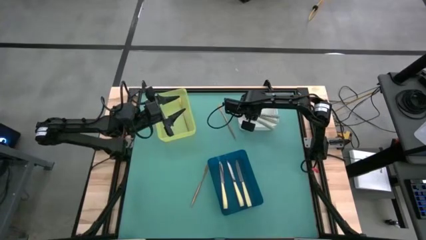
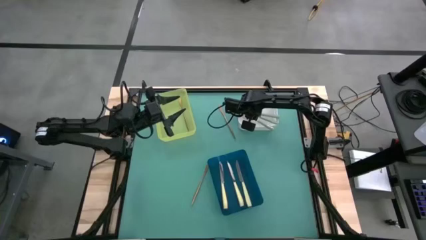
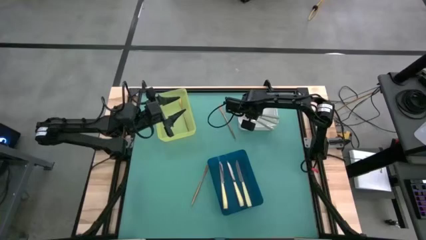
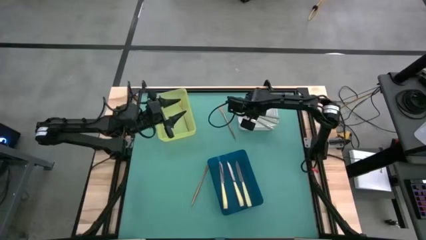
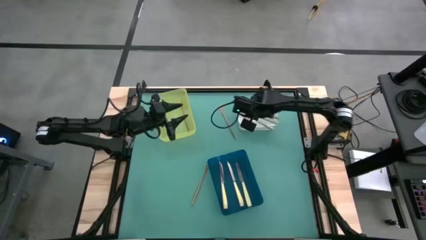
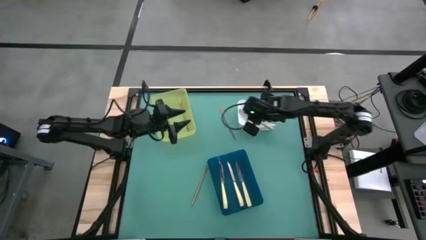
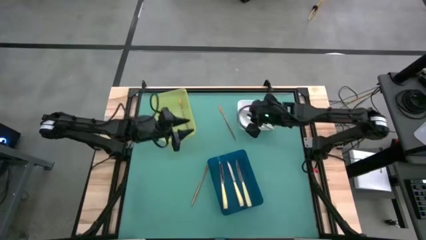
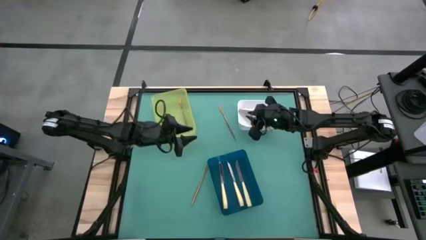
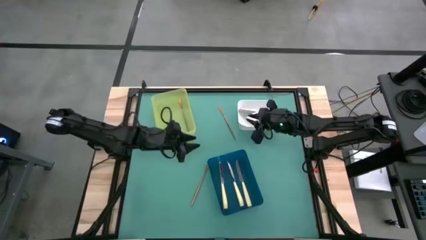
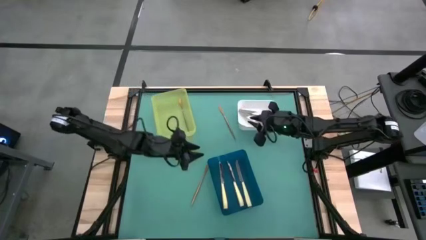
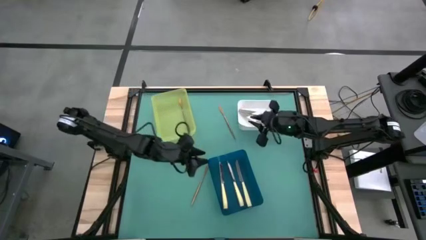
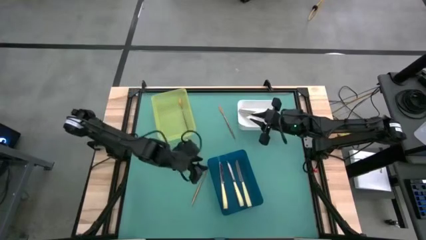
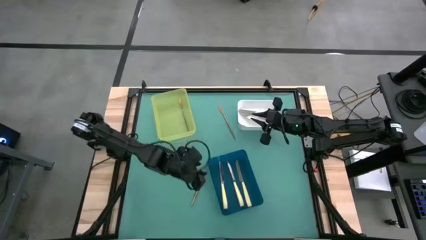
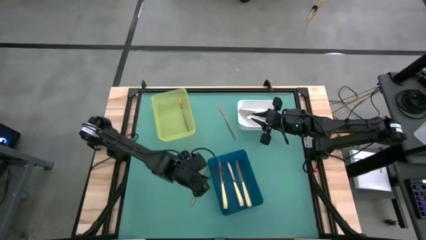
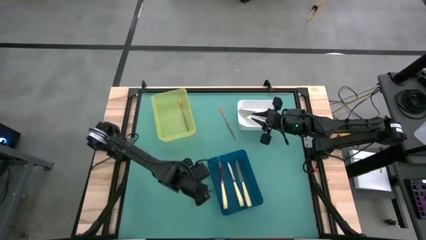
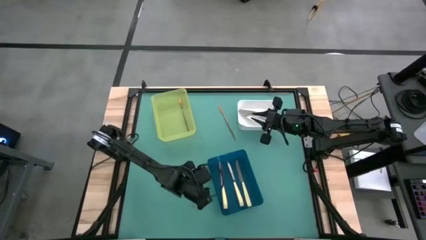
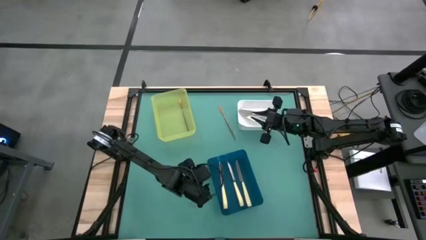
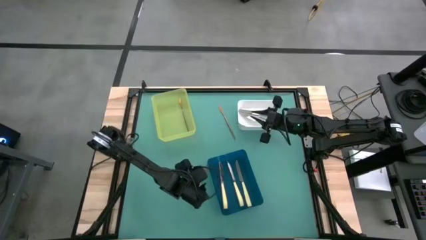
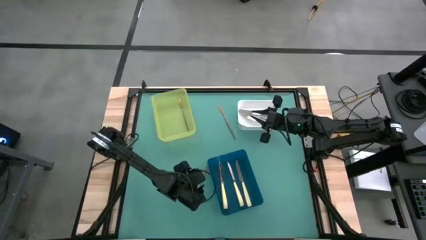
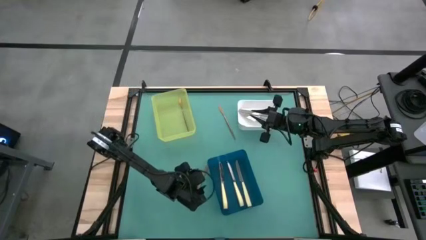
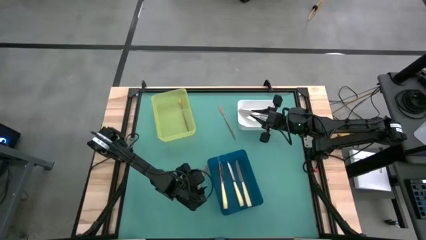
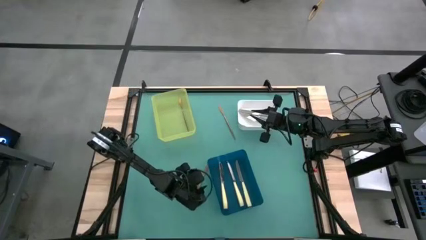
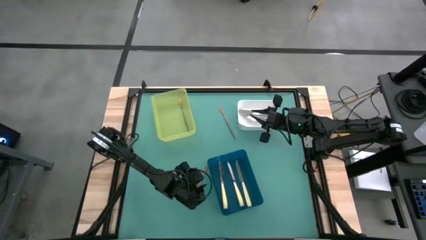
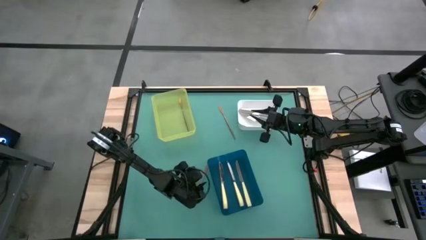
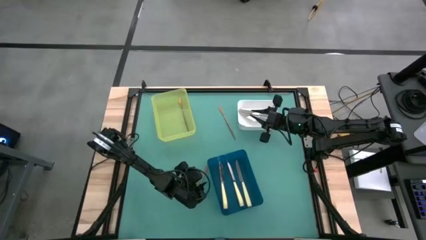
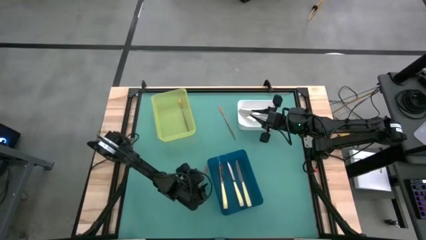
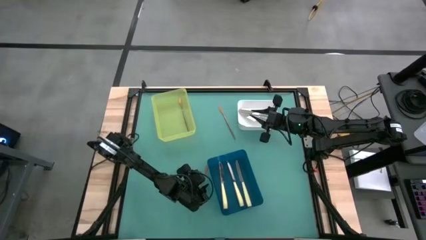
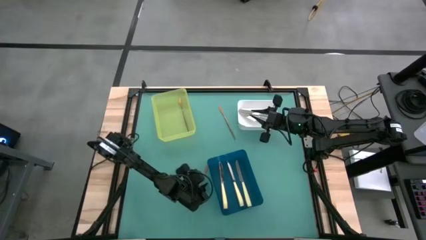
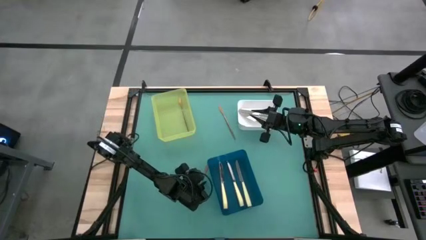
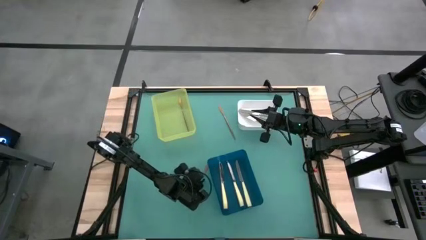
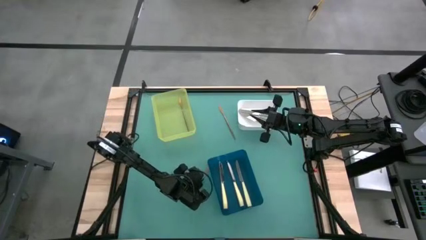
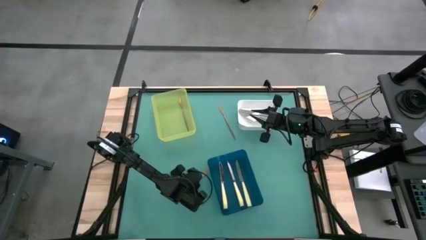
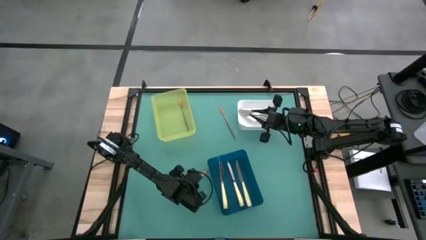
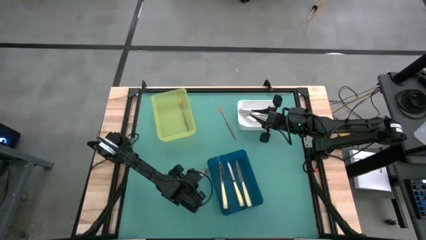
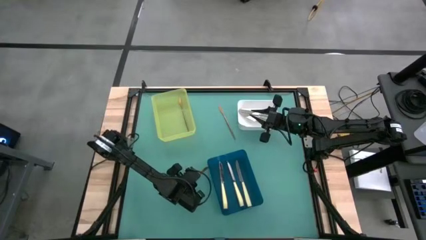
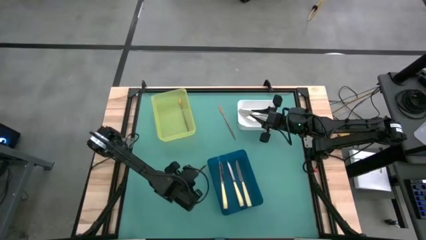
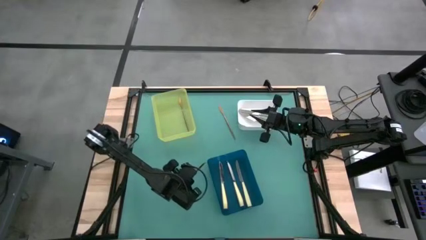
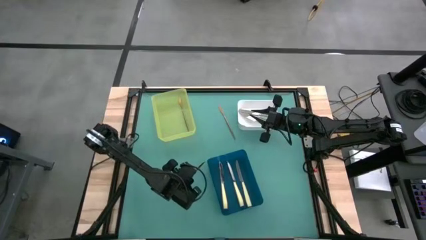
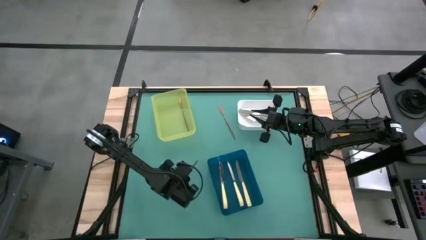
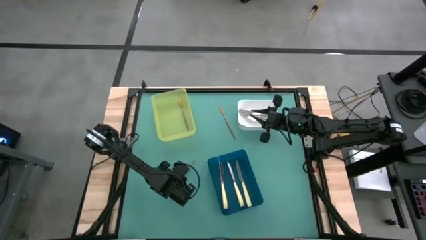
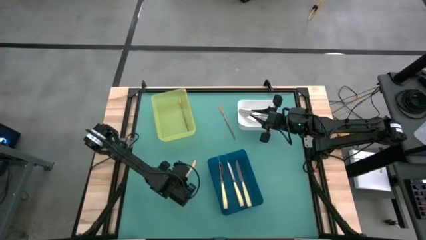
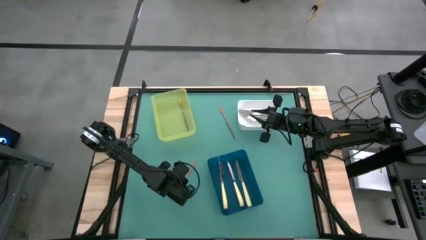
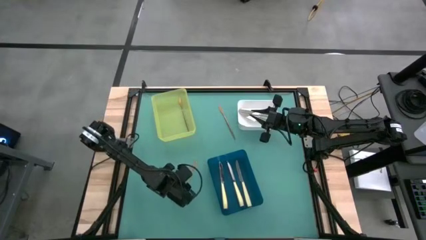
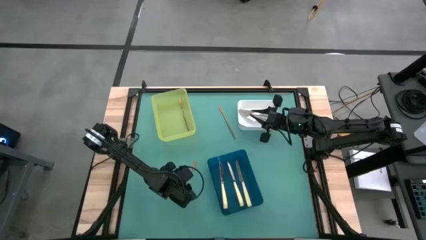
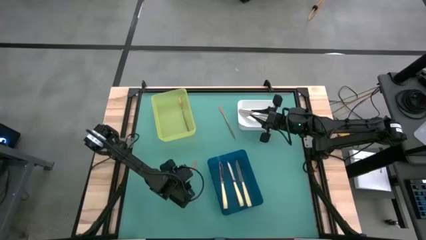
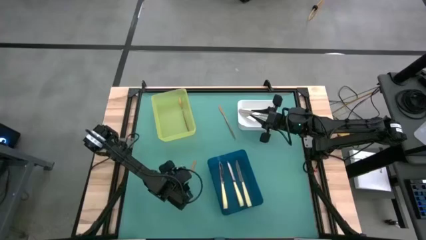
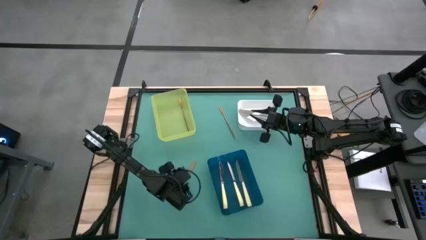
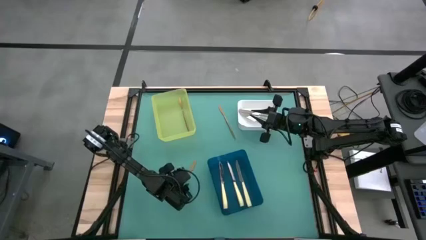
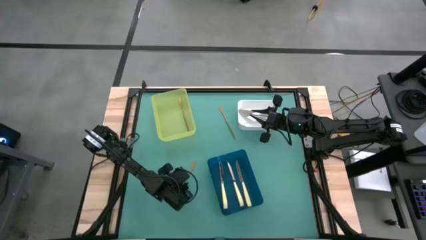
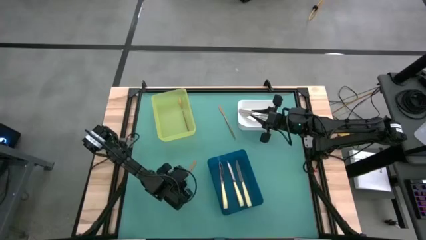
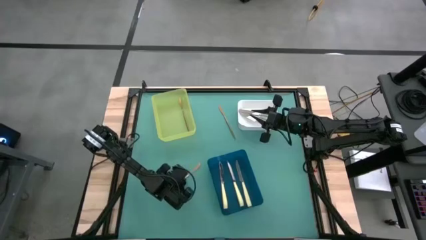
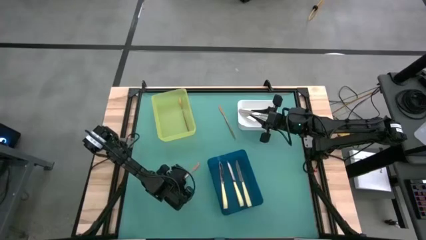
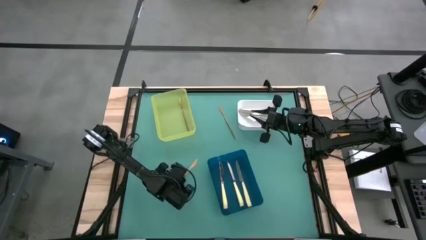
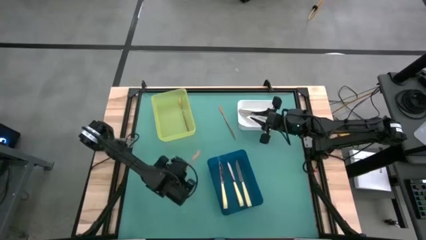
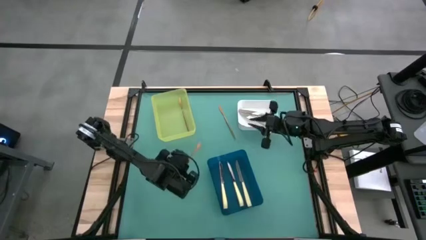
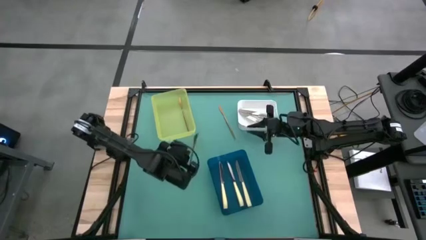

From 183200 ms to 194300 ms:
Task: Sort silverware by color (type)
Put the bottom gold knife into the yellow bin
